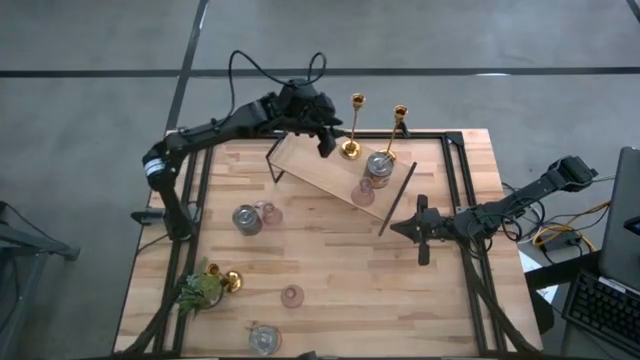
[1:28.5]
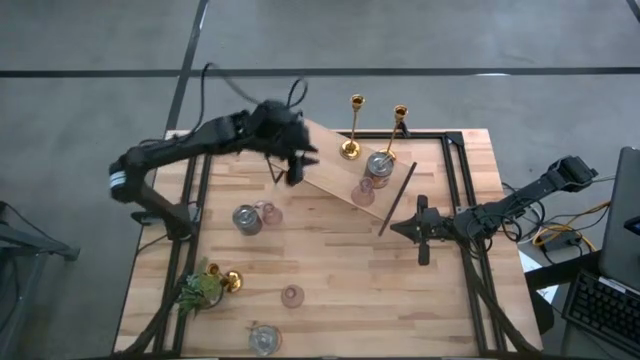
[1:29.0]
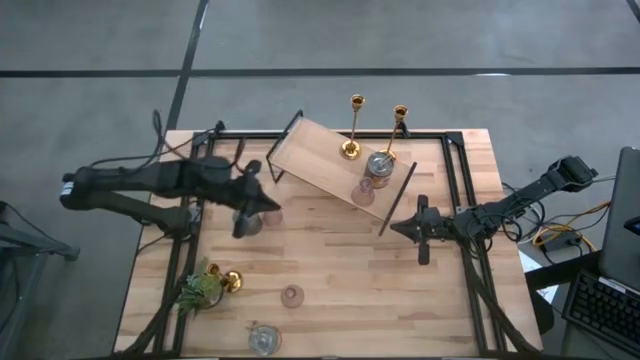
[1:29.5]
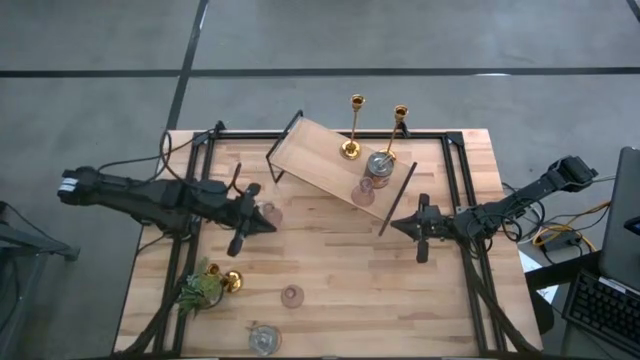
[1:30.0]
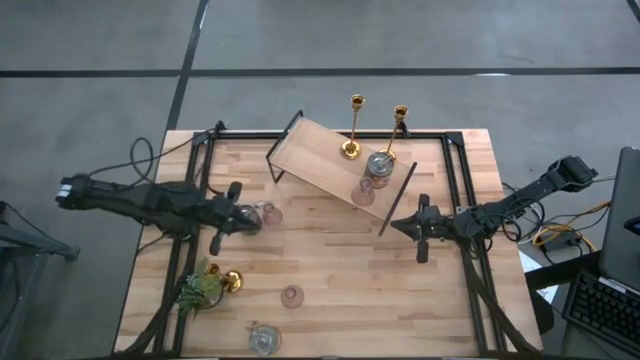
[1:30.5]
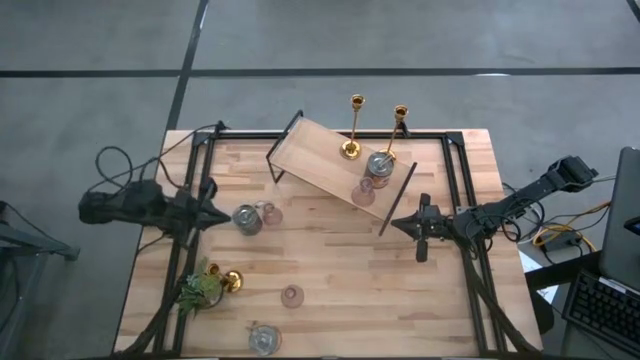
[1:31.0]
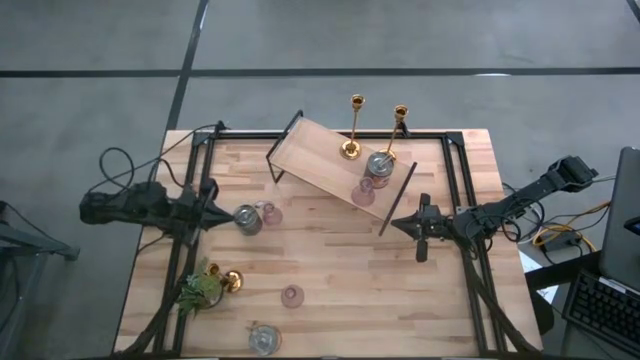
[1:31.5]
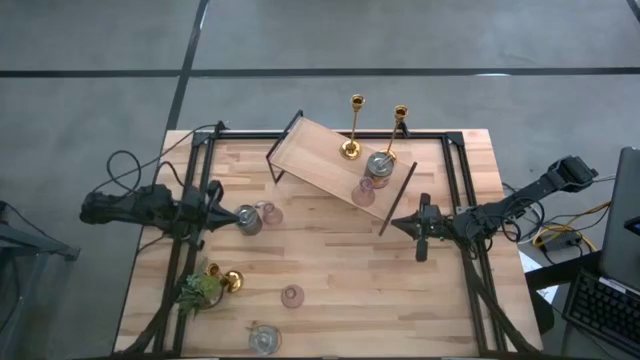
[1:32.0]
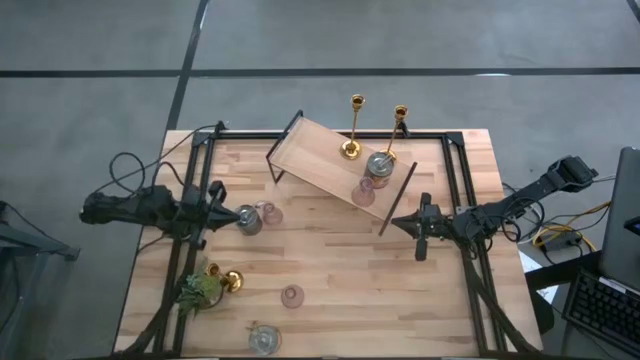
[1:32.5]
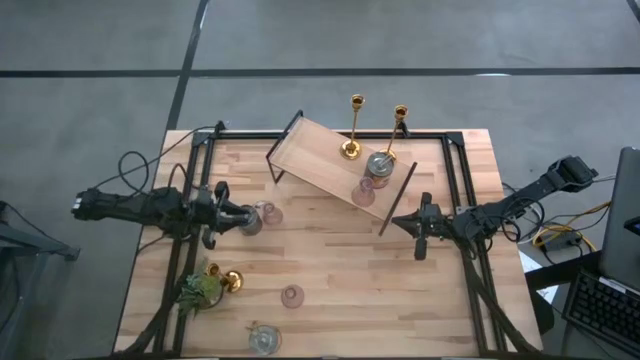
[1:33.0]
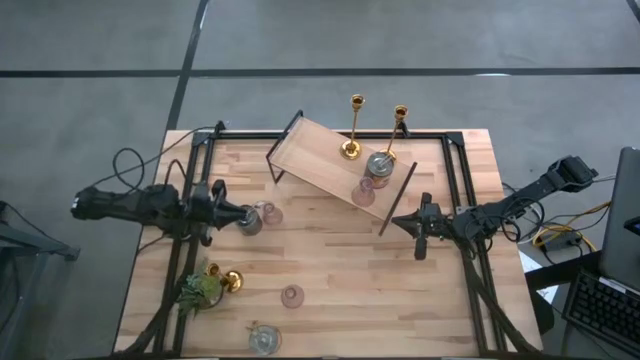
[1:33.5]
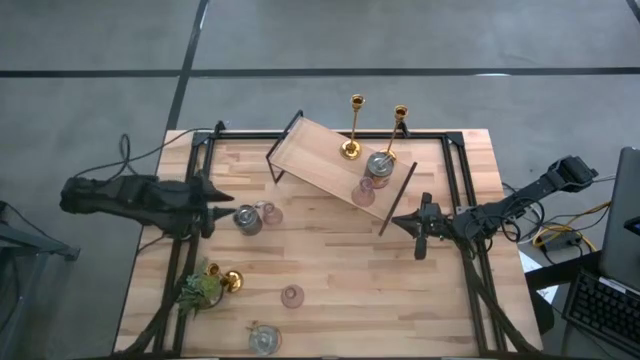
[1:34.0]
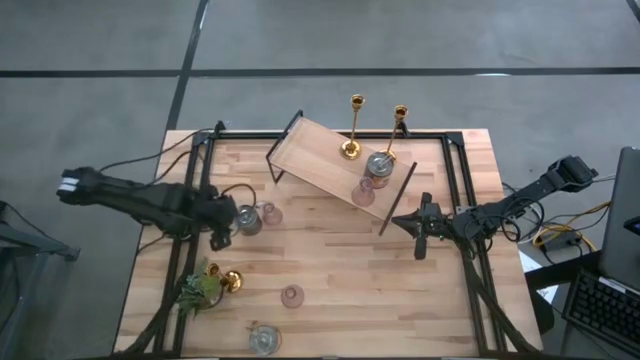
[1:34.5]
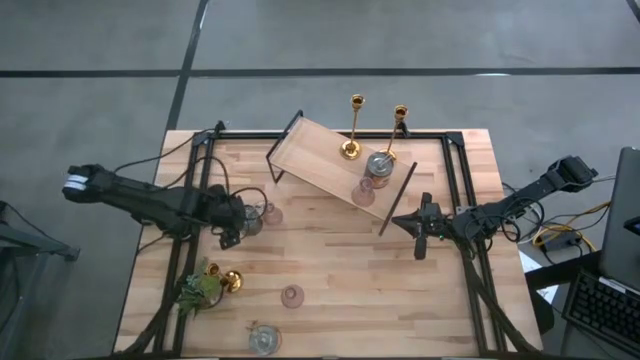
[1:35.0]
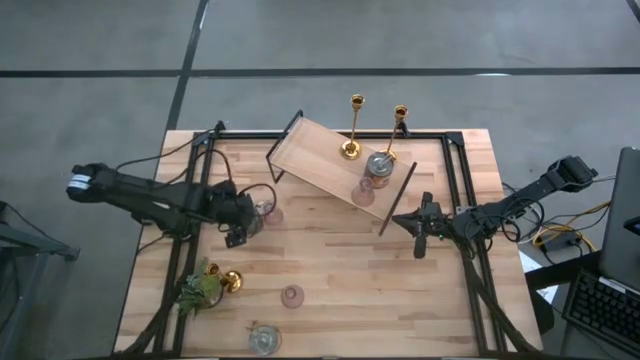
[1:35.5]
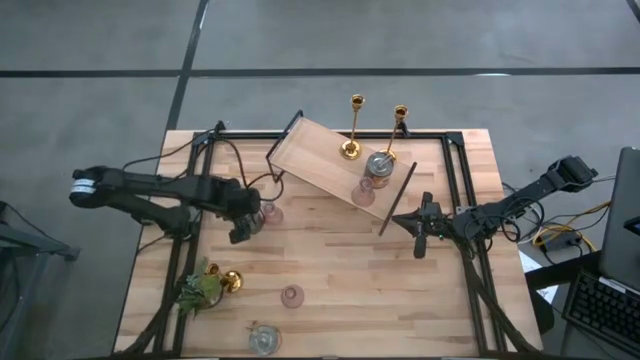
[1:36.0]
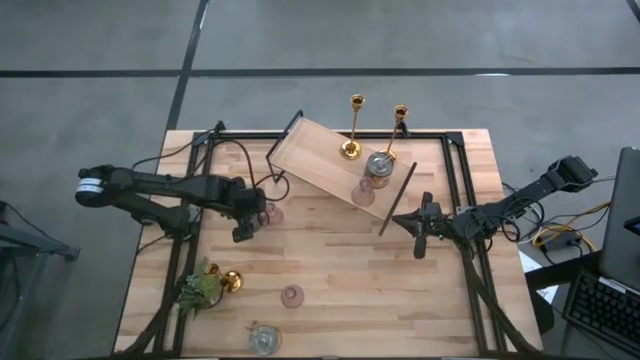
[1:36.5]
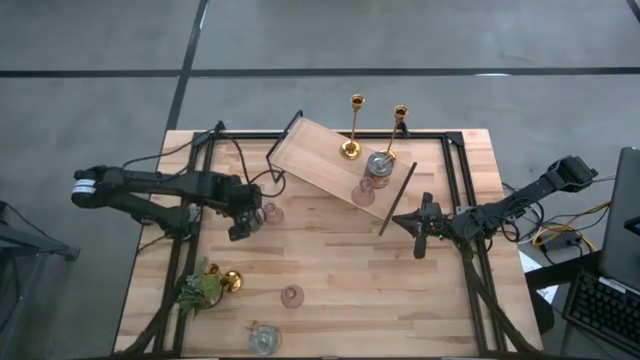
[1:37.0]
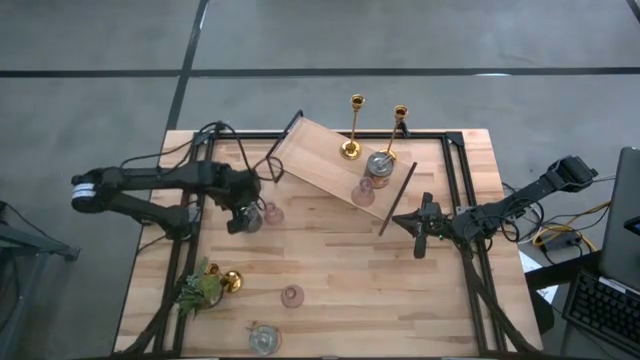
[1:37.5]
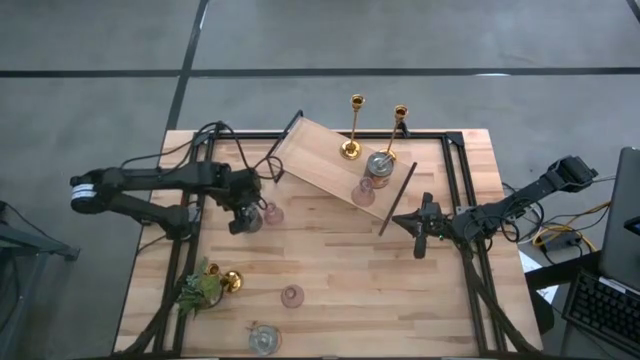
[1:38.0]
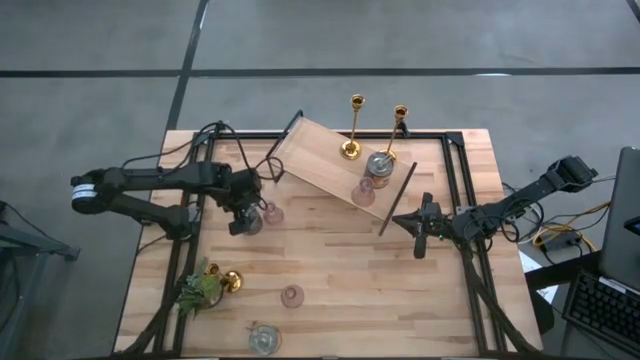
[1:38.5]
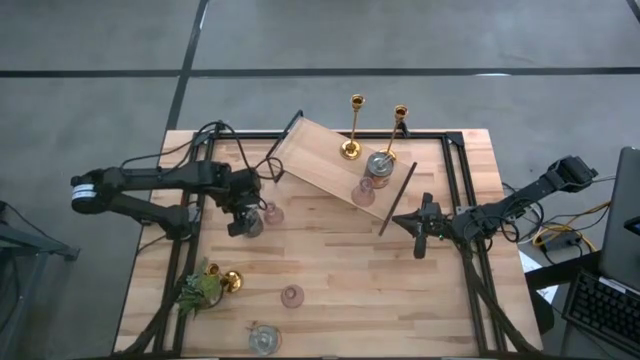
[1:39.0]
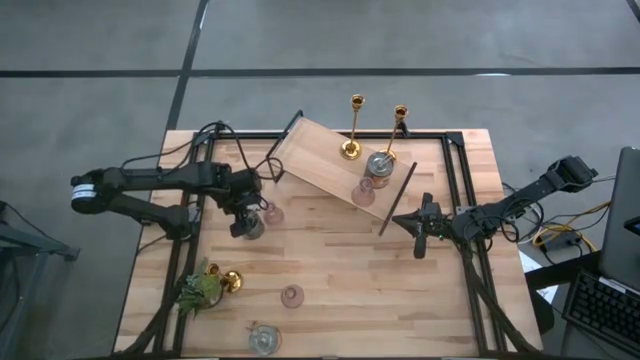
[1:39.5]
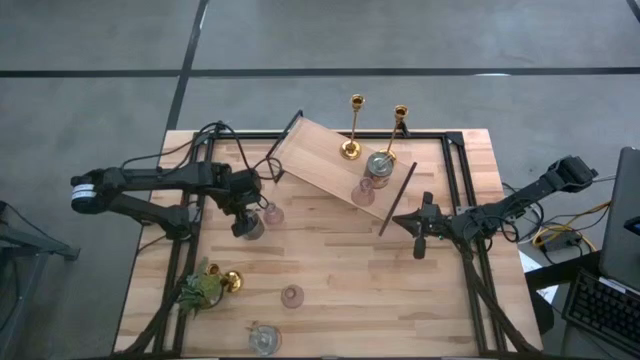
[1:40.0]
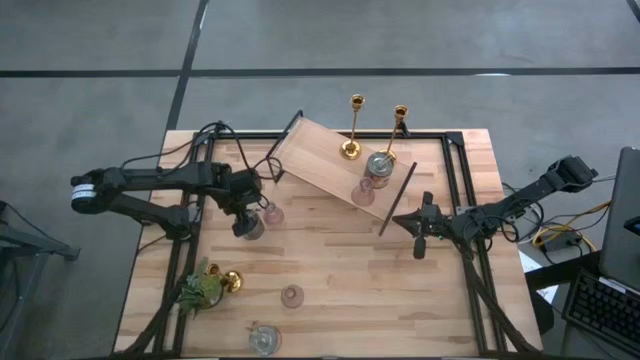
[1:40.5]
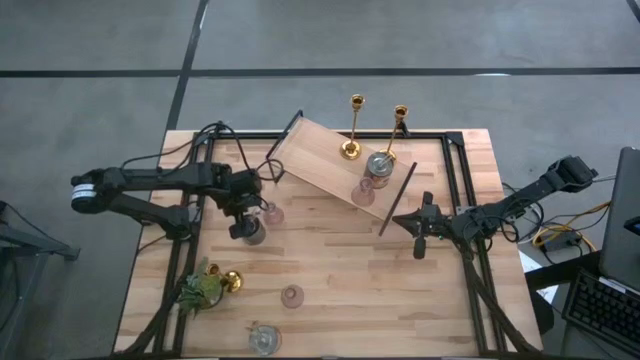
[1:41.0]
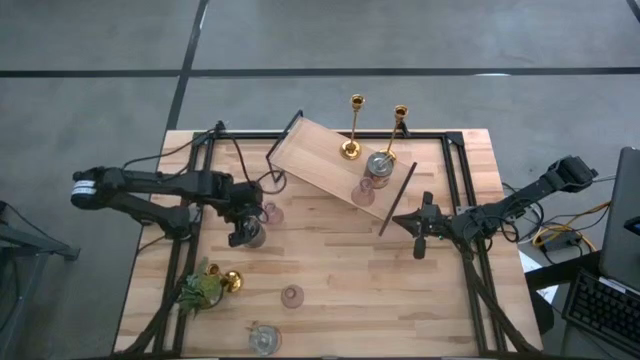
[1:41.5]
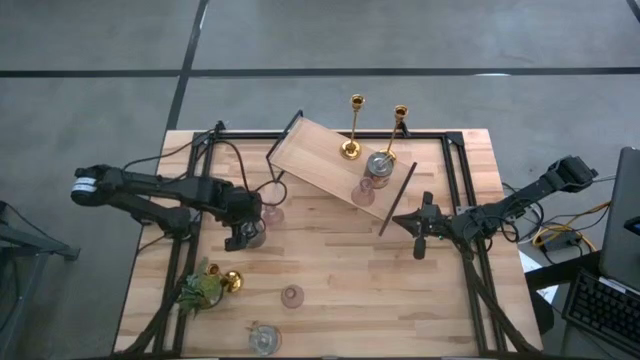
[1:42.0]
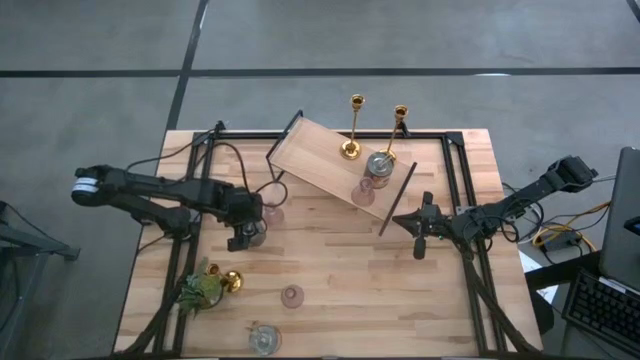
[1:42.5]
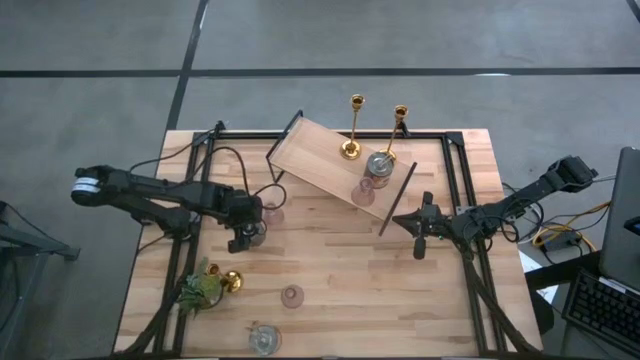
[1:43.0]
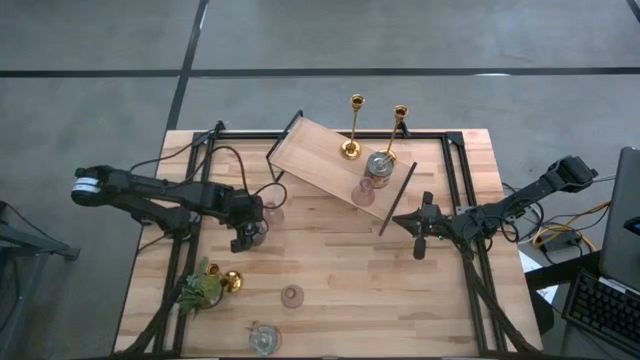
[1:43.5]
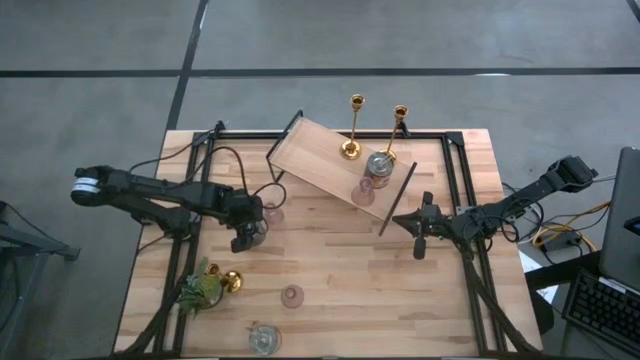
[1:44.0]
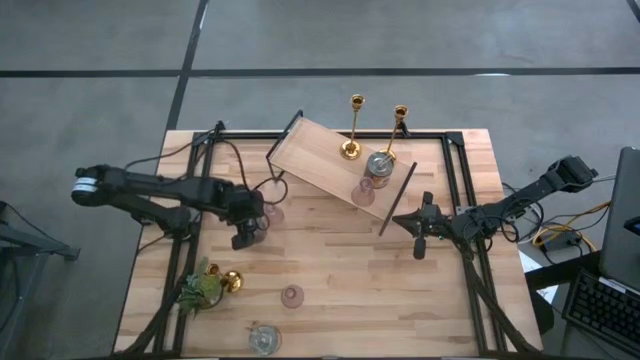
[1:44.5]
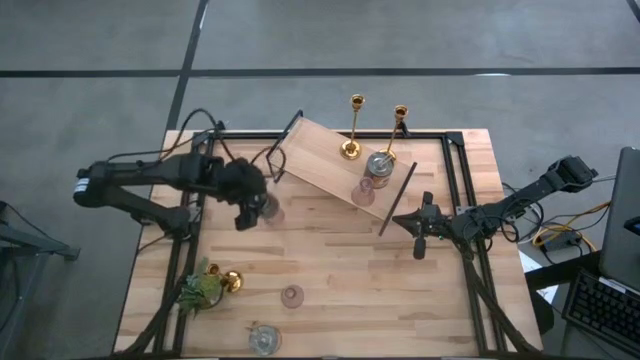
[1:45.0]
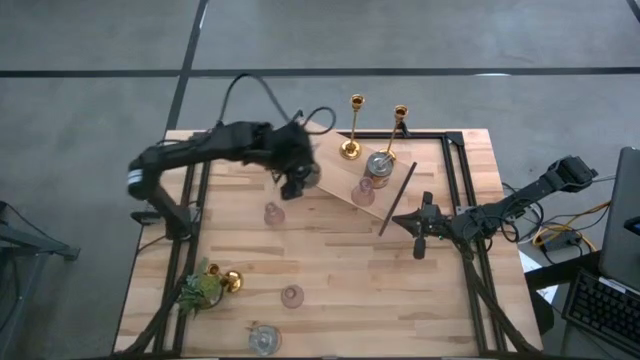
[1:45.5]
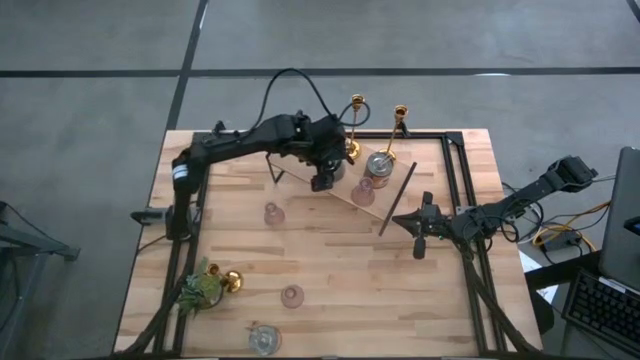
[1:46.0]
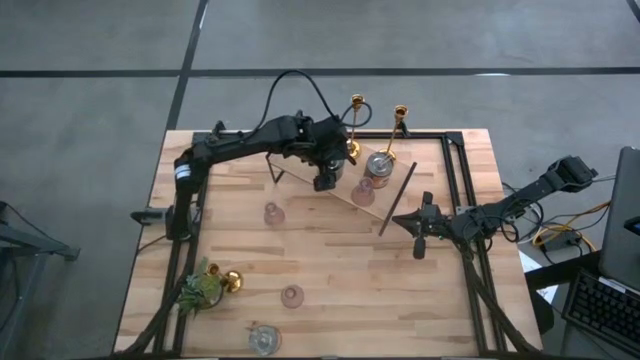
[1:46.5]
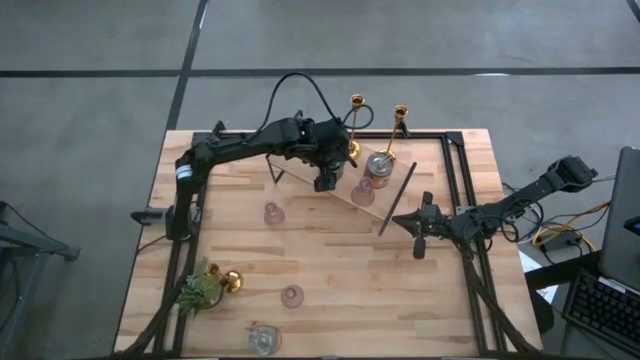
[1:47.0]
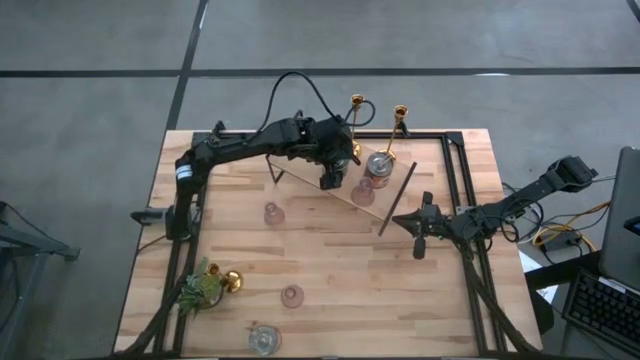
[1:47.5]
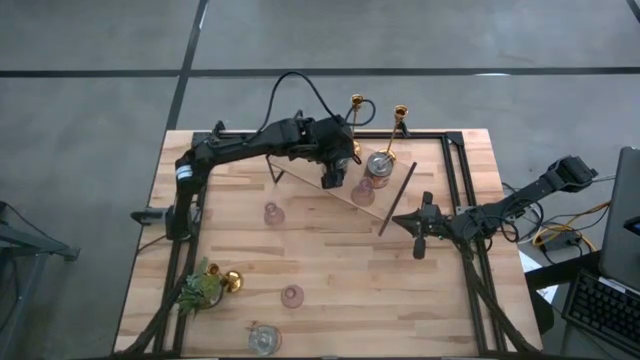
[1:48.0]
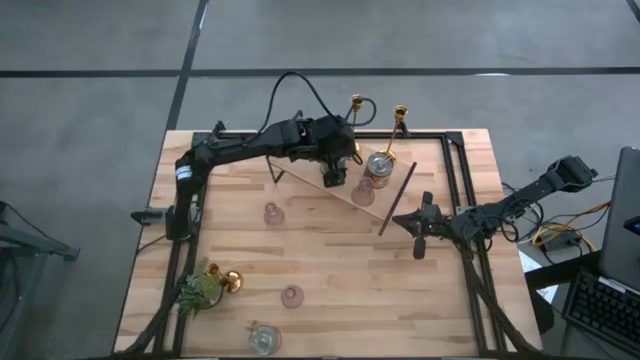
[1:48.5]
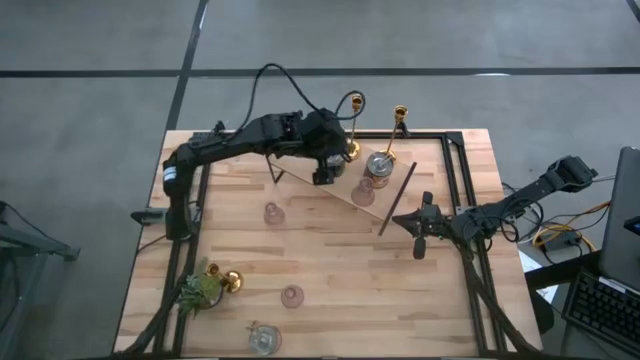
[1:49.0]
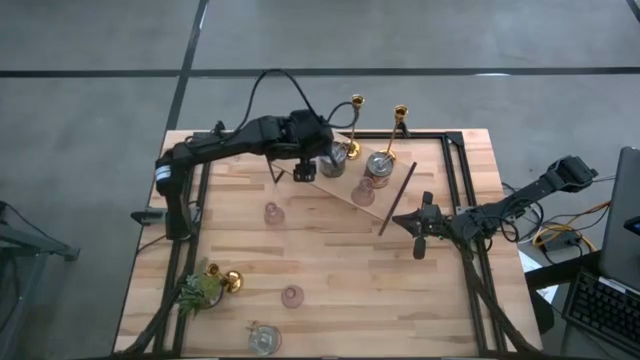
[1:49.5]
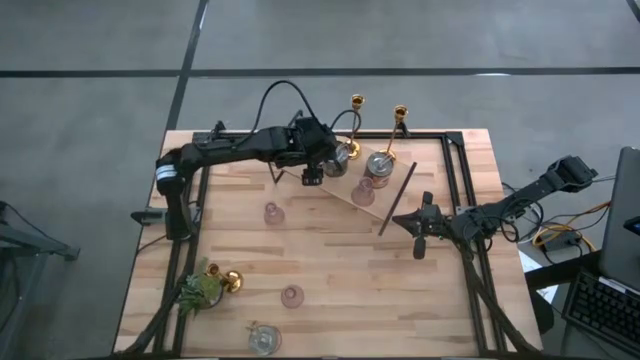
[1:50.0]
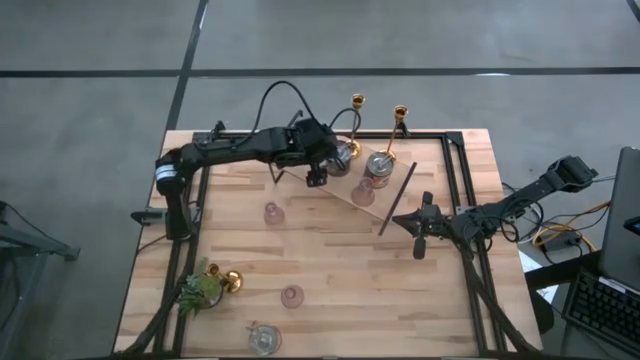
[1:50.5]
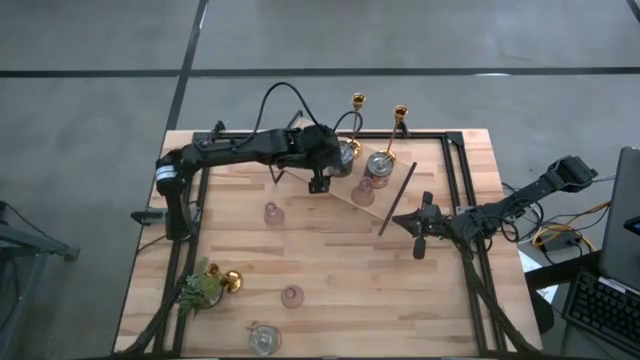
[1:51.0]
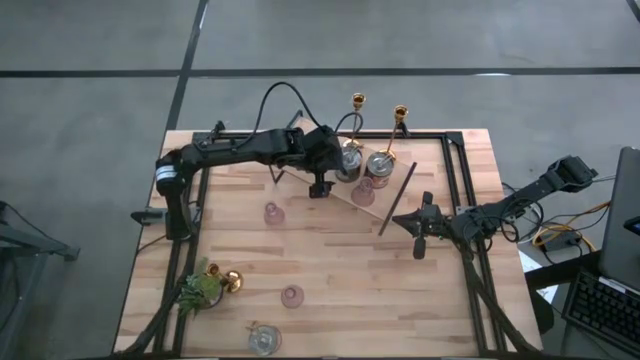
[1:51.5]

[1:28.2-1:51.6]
Task: Pick & Place candle stick holders
Put the top silver scented candle on the shelf aligned with the other silver scented candle
